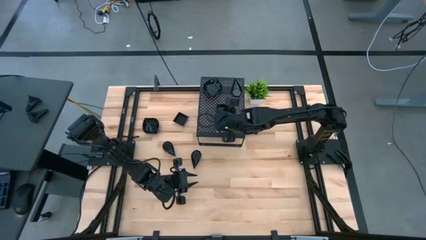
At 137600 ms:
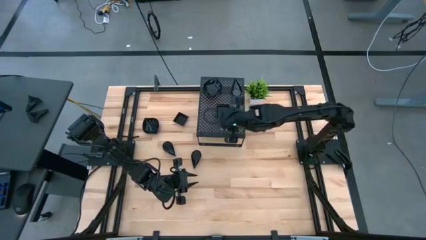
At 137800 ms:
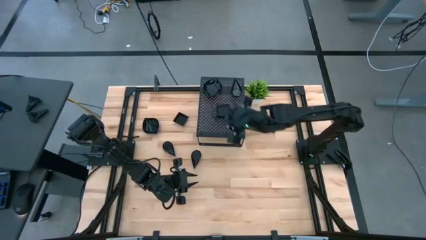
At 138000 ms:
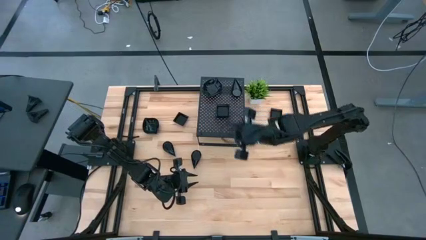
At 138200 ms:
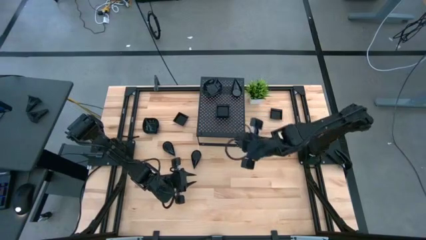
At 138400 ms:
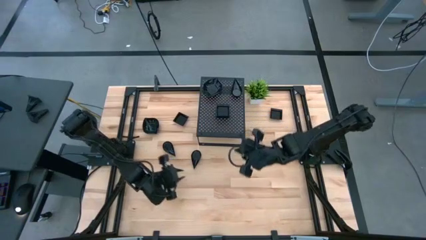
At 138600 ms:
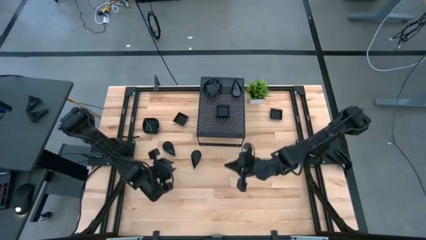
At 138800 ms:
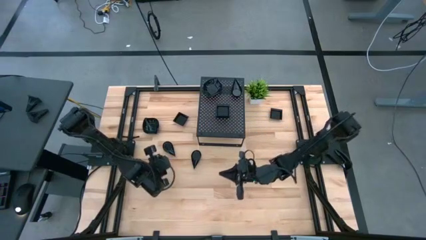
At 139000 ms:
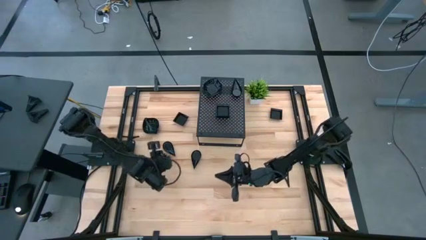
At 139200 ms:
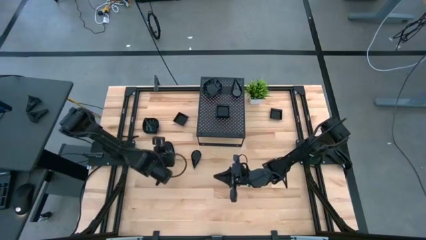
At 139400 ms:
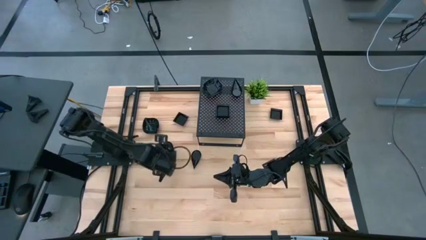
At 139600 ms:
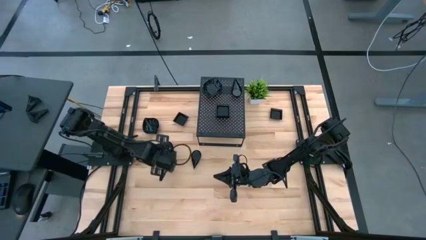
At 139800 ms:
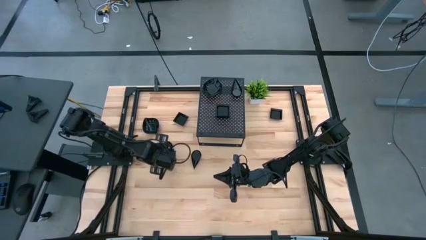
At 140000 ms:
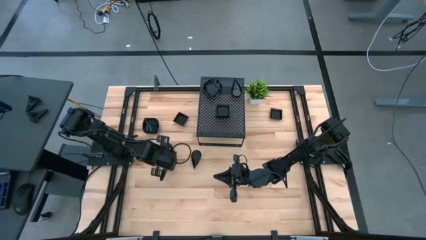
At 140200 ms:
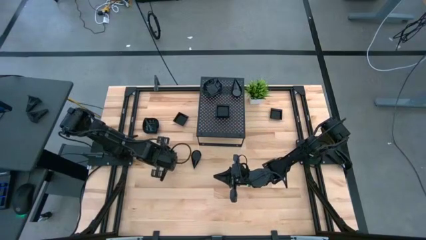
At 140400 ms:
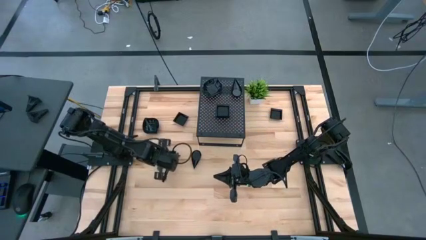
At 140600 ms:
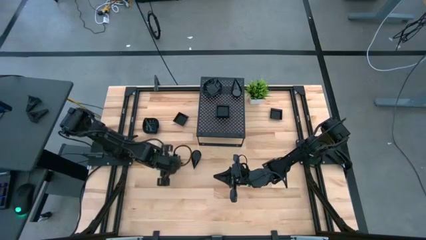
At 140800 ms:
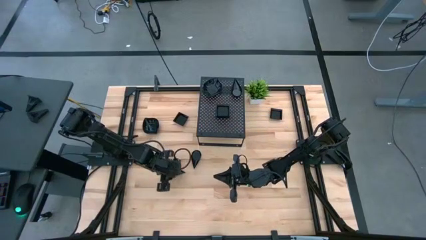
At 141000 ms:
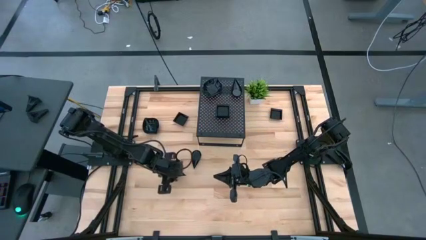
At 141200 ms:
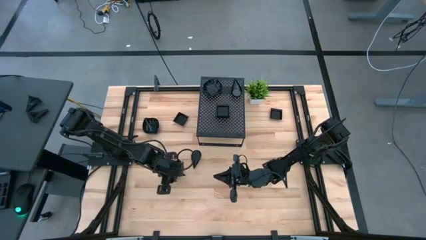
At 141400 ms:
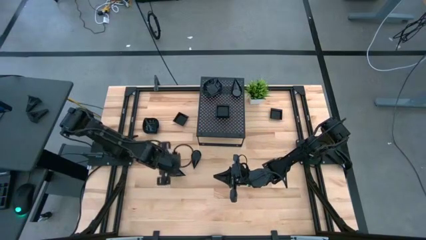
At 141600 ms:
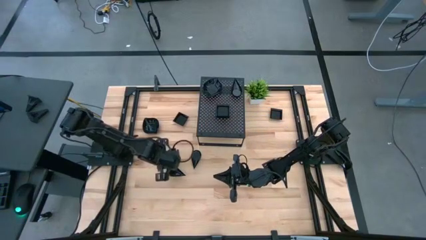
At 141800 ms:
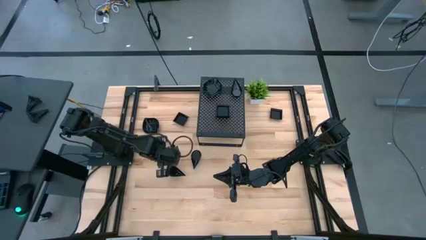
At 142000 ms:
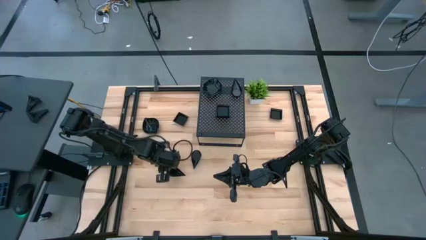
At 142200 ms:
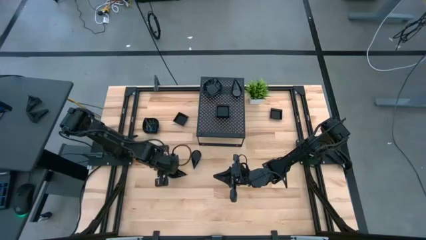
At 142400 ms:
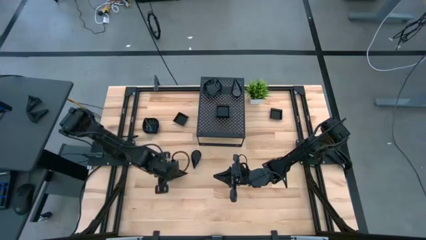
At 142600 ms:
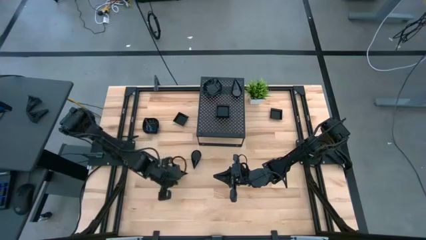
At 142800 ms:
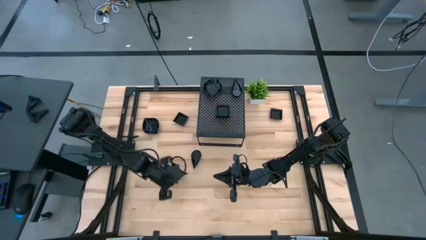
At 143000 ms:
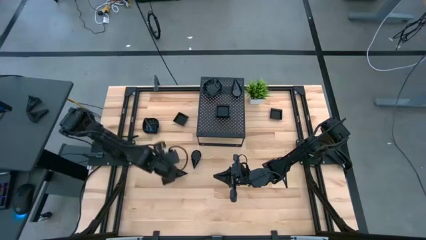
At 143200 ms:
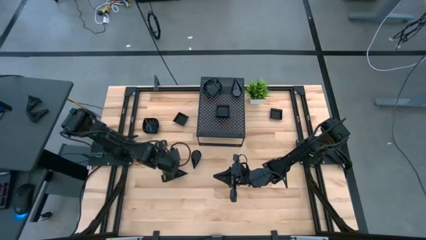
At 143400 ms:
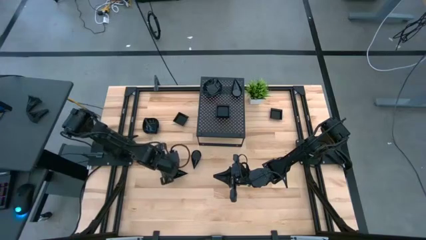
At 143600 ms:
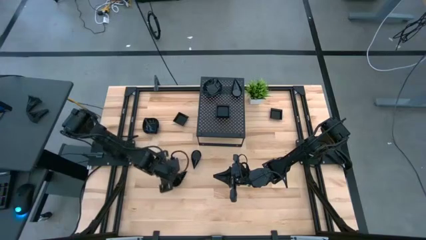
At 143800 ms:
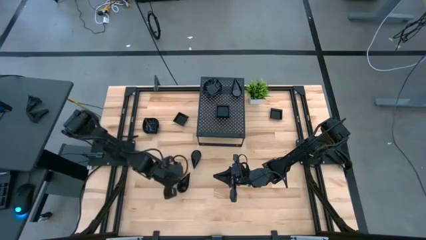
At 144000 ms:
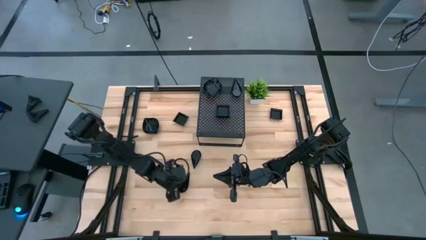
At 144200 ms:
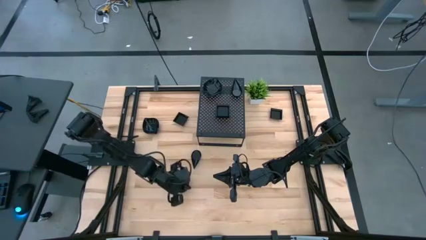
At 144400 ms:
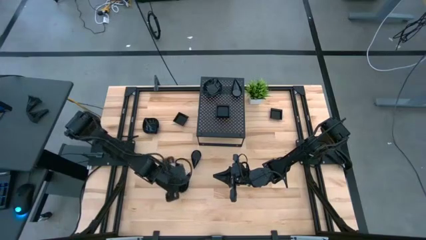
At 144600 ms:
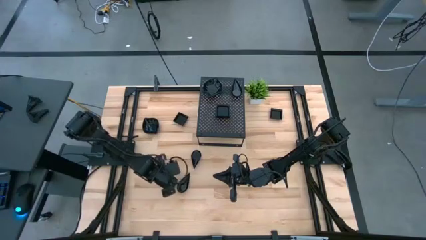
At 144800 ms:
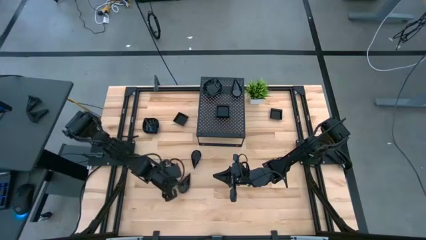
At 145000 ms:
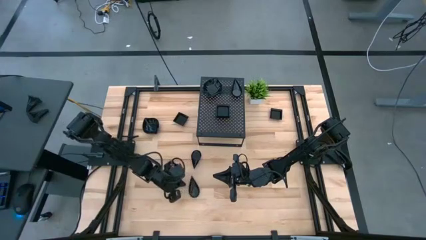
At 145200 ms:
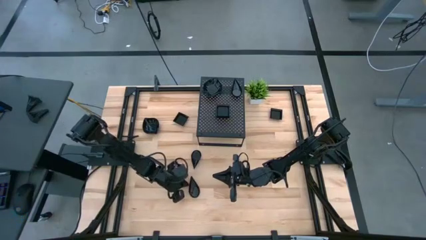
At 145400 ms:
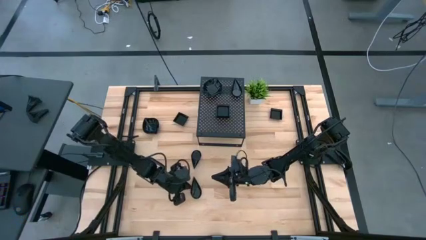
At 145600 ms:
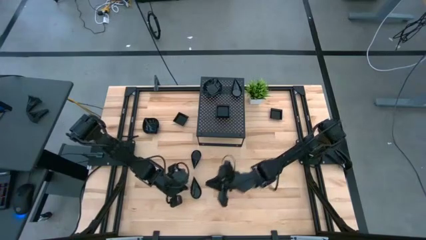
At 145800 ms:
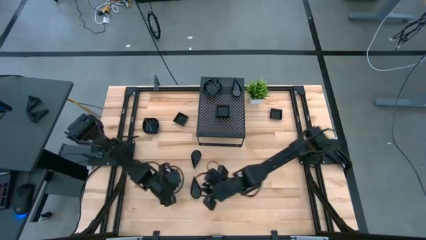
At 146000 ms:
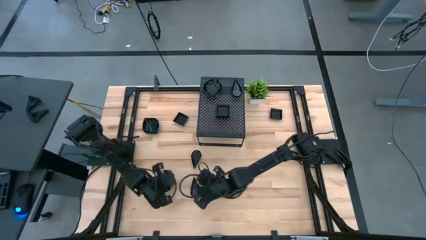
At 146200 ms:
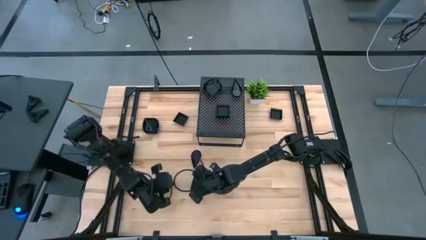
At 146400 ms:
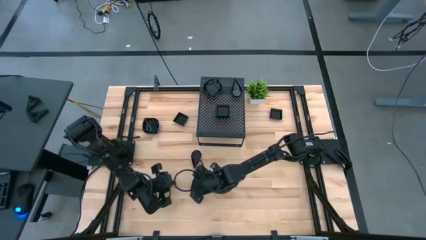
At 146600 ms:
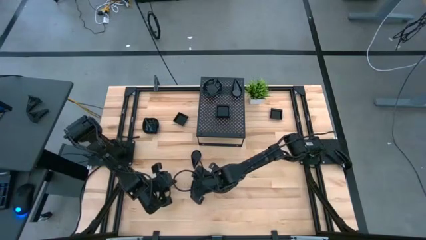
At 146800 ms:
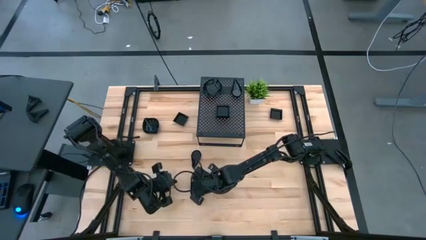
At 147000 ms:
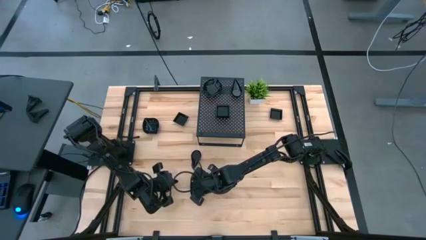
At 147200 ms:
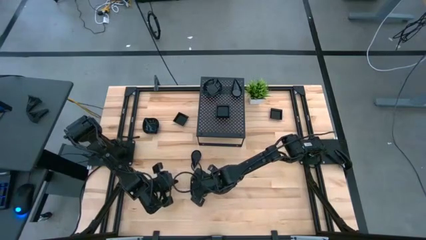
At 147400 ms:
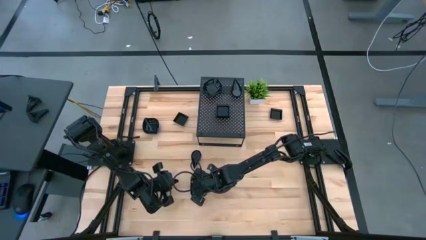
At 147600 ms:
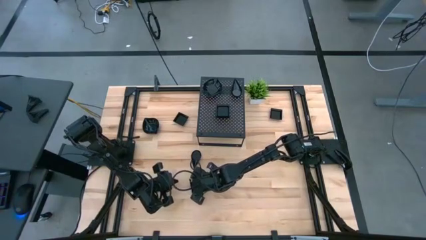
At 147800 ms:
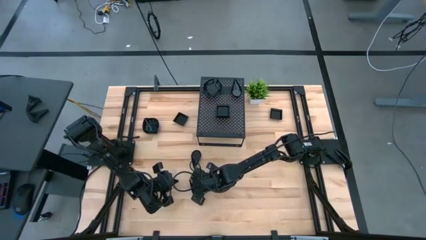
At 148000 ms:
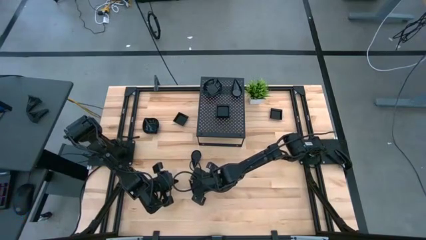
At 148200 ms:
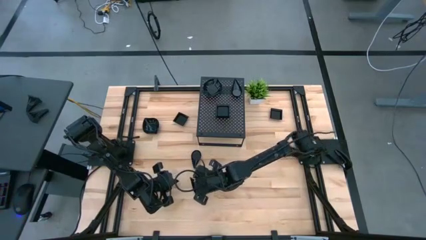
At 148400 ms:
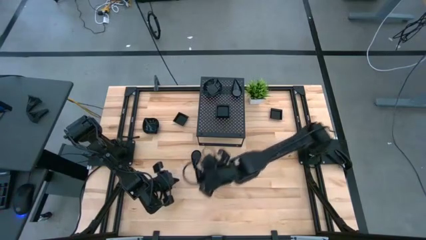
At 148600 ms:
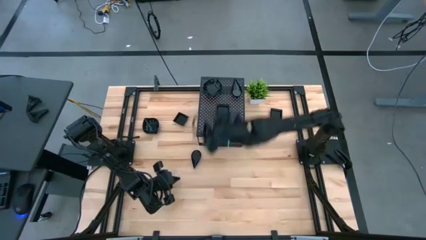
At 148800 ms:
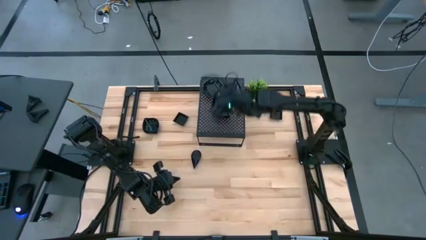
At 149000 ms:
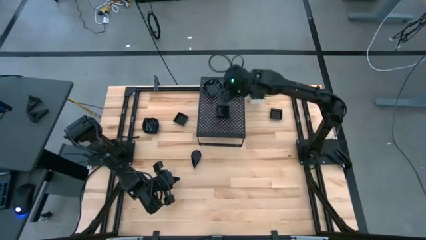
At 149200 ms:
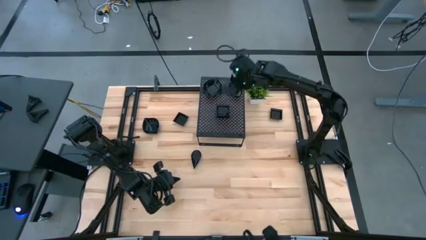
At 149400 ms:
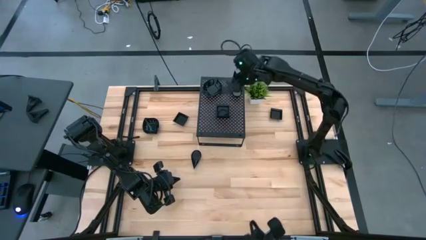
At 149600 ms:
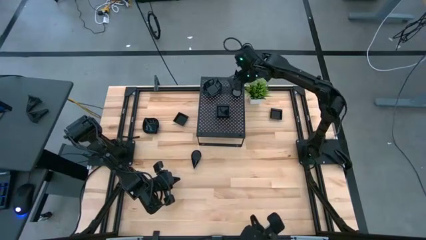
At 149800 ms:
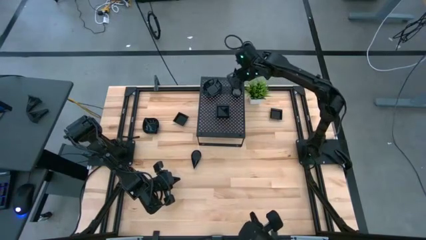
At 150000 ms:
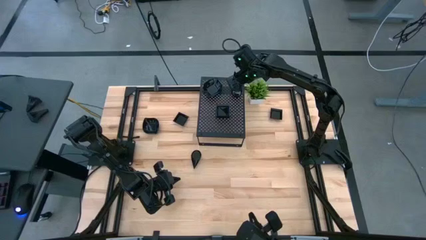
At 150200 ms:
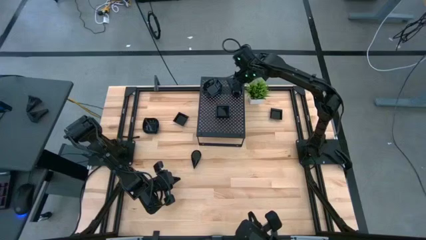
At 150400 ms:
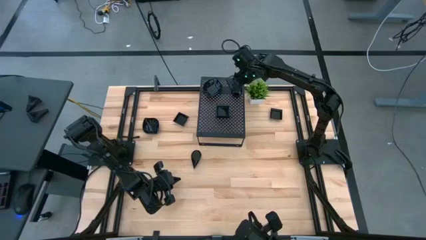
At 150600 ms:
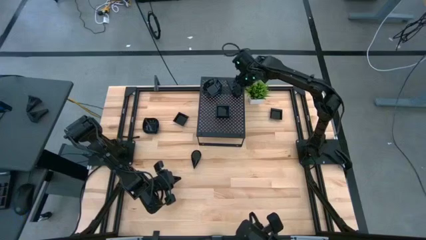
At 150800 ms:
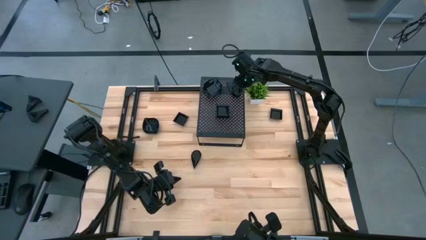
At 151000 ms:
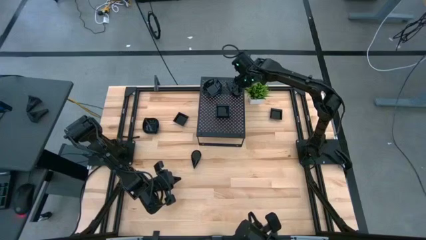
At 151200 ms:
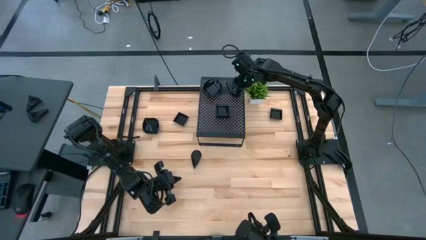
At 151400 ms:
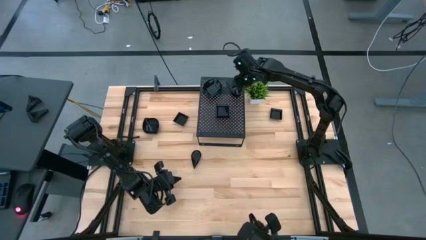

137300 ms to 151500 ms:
Task: Pick & Place Mini shaped plates
Stack the black drop-shaped plate on top of the black drop-shaped plates on the shelf
